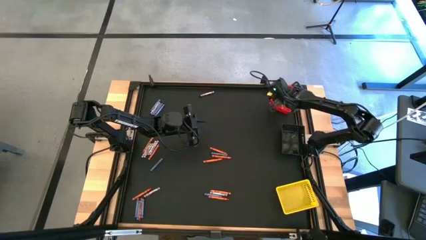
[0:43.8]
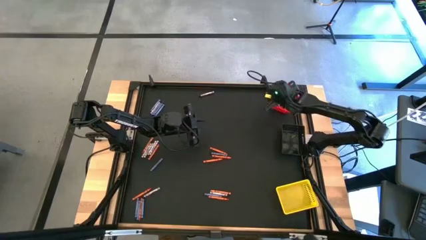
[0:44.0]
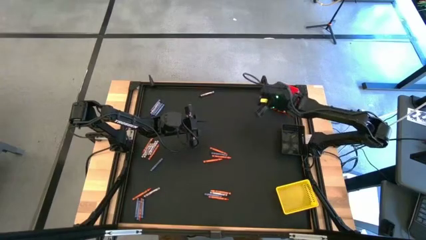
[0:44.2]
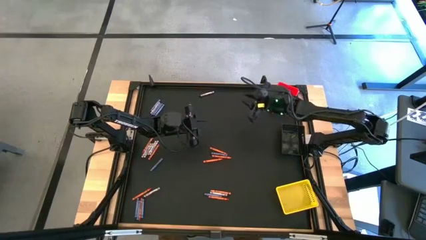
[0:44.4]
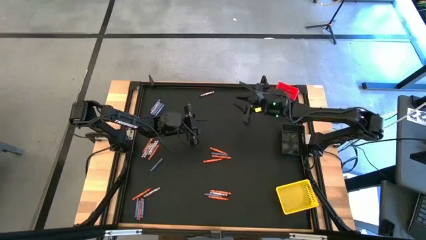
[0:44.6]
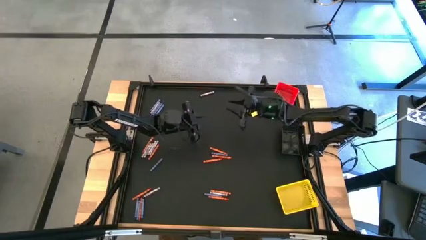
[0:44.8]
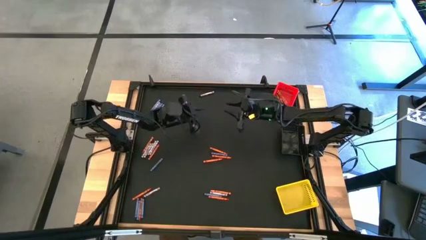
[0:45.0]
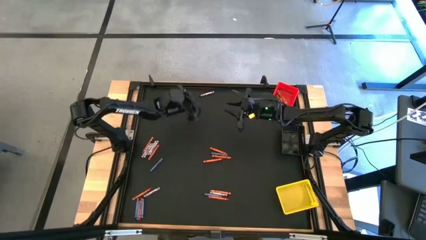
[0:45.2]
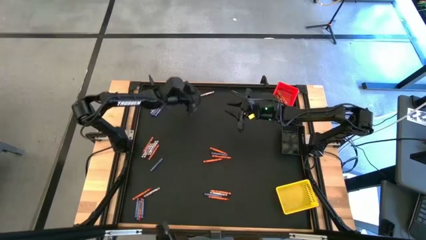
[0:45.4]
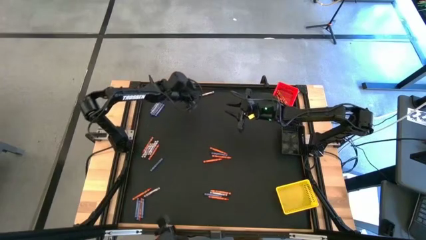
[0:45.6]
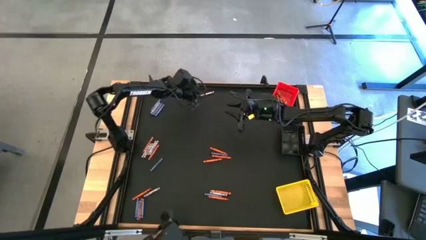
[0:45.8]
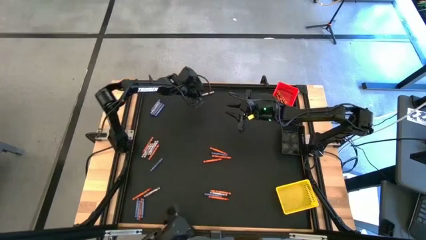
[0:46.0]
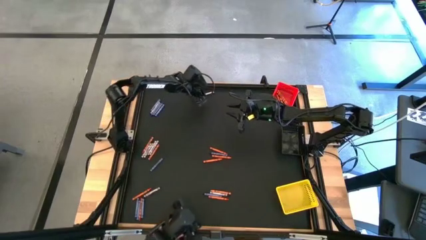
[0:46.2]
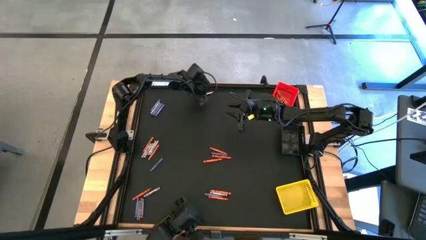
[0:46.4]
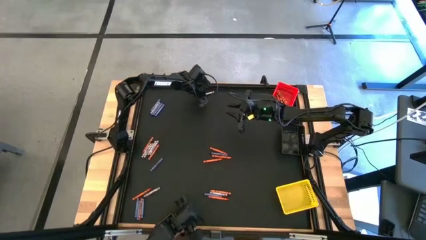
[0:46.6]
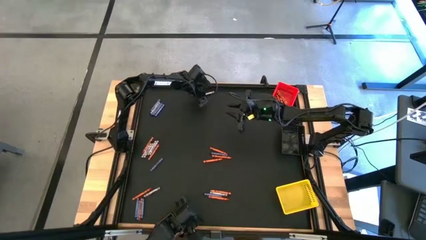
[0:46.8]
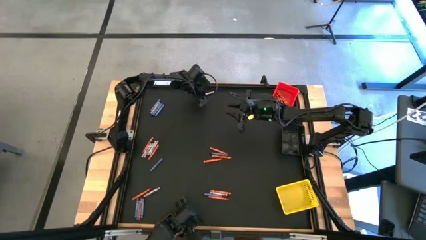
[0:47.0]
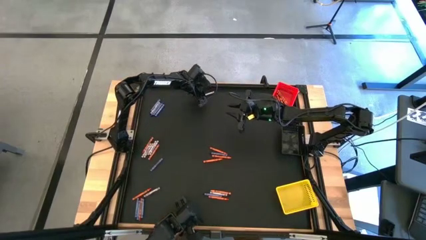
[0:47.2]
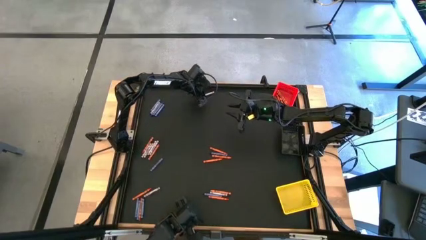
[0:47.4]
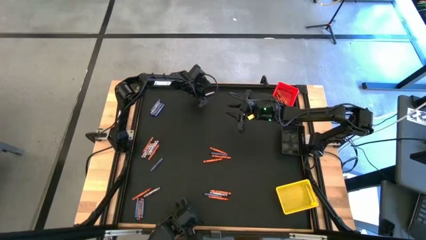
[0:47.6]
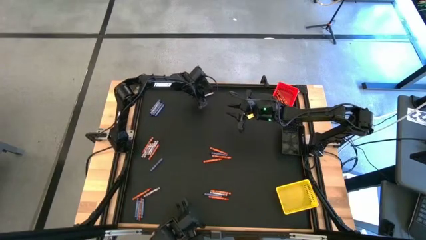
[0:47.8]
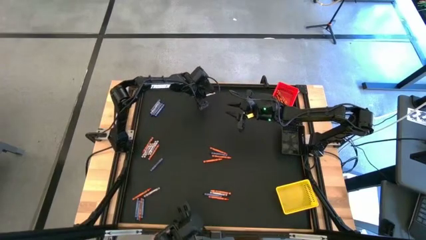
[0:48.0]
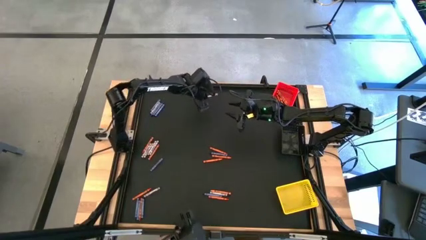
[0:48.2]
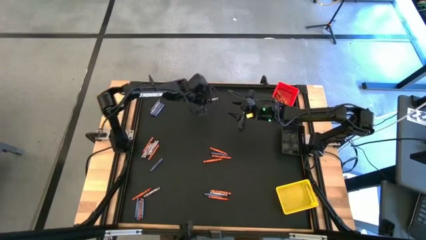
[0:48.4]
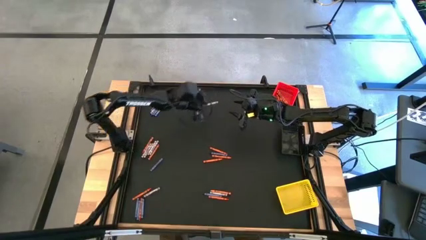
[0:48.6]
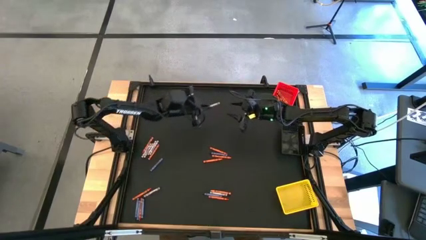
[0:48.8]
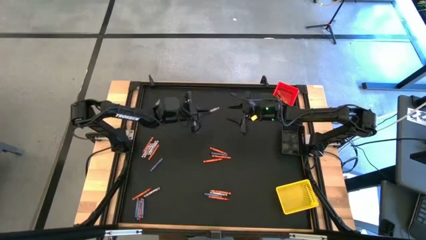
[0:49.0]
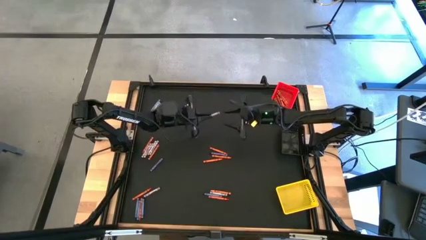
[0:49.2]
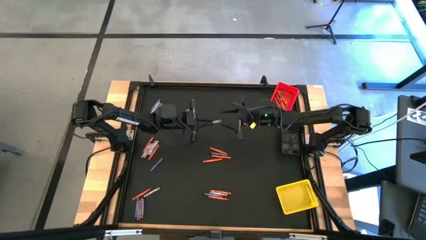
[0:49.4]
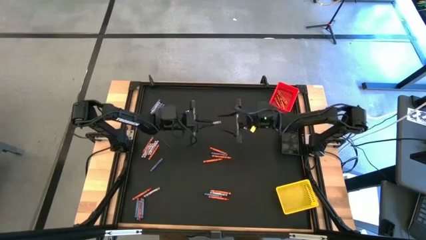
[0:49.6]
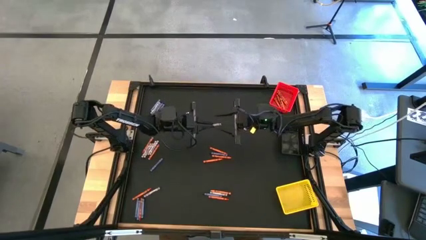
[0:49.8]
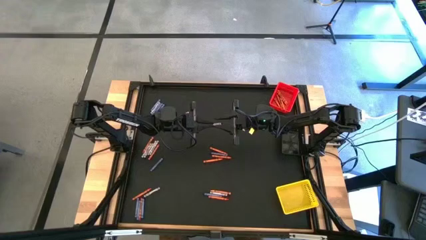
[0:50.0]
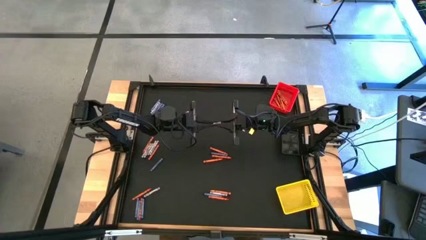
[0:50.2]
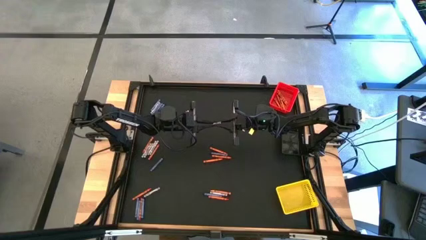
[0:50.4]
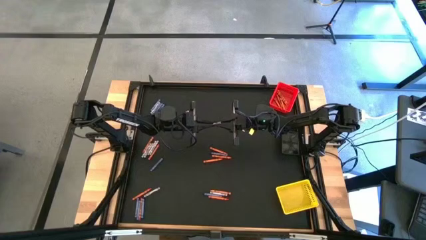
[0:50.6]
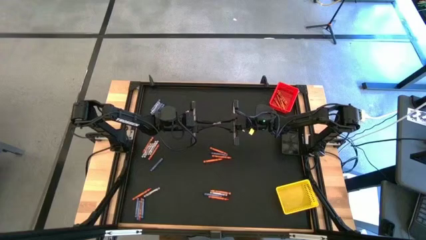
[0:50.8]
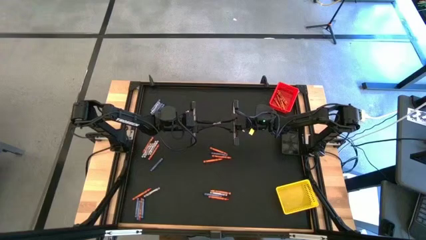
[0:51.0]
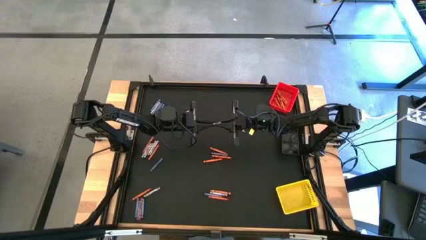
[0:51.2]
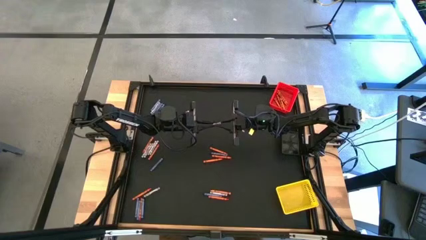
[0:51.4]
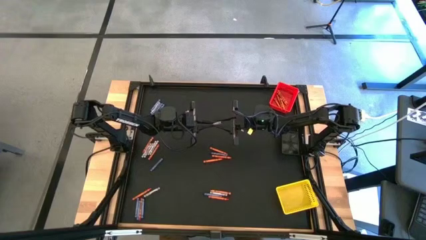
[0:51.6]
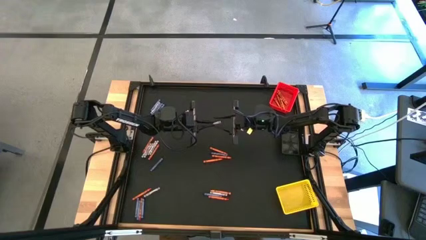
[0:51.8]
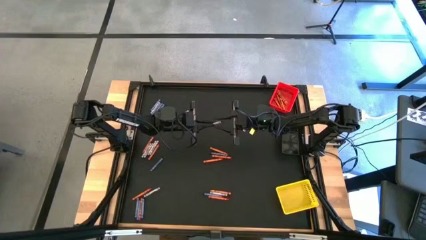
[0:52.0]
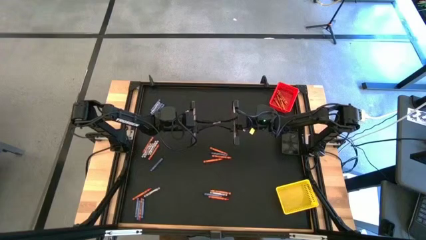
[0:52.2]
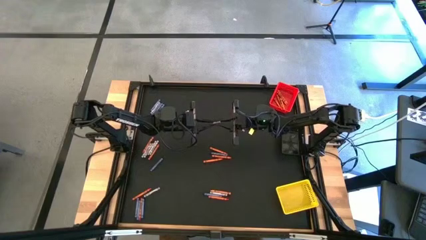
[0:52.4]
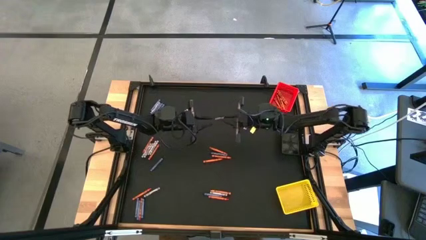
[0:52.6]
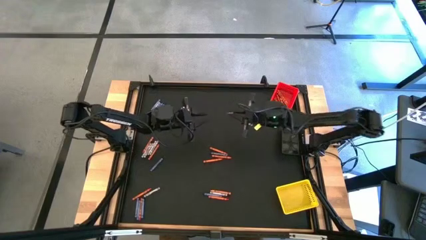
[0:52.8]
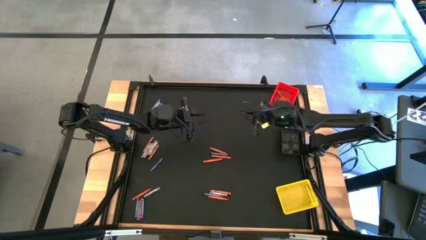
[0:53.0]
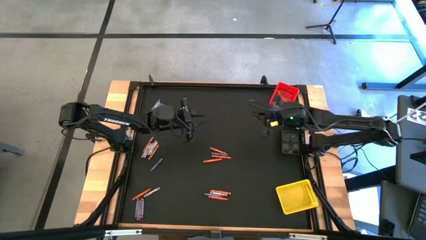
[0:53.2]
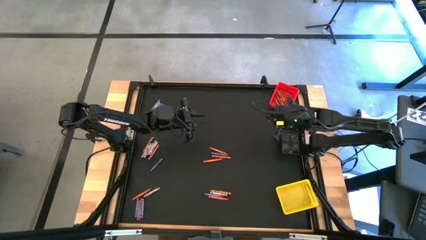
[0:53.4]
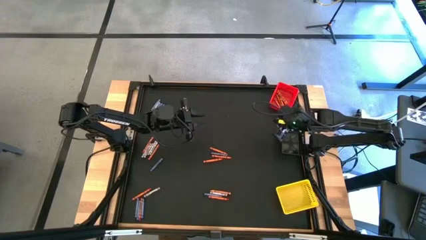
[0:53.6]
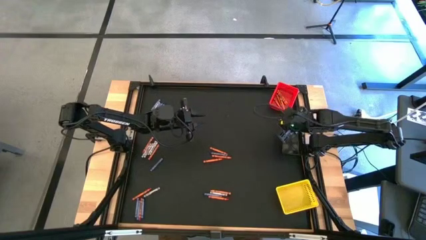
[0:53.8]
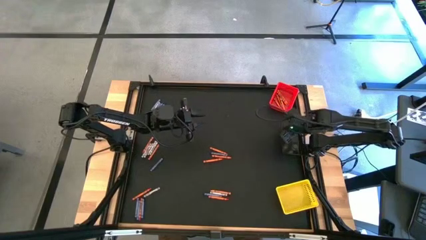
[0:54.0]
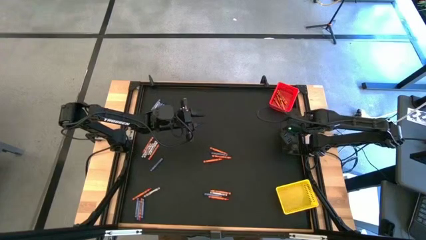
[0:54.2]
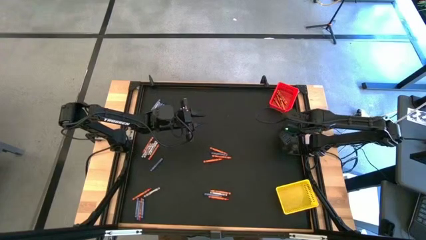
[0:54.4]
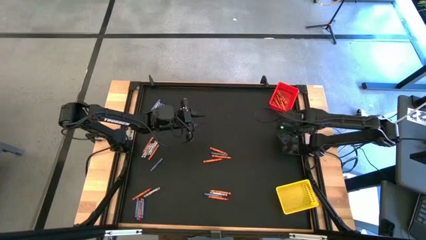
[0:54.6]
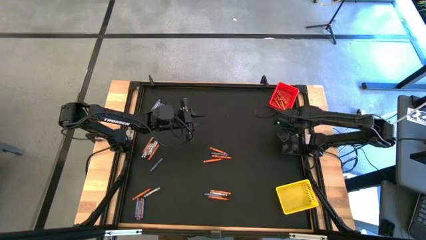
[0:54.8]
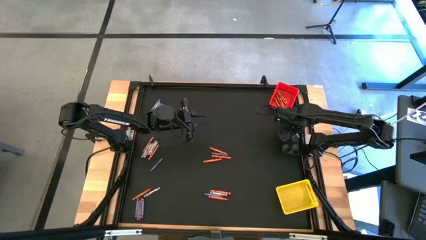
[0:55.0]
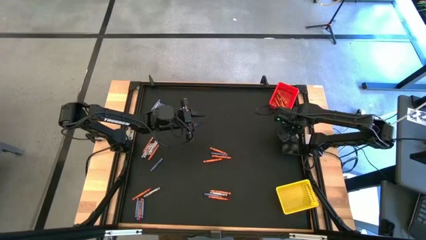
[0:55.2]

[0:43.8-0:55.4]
Task: Sort crayons
Put the black crayon into the black bin

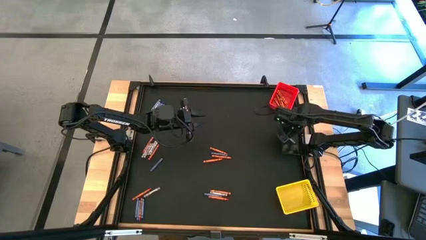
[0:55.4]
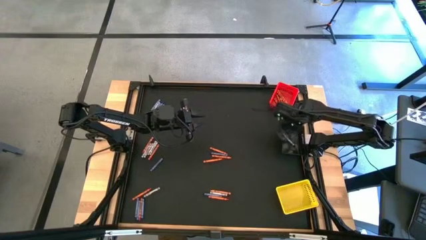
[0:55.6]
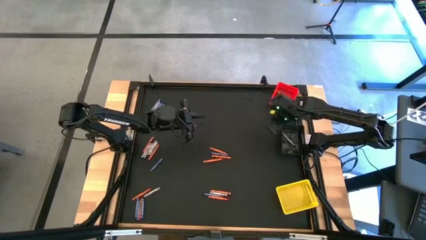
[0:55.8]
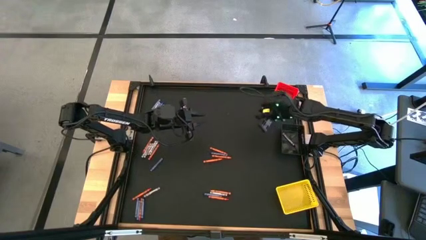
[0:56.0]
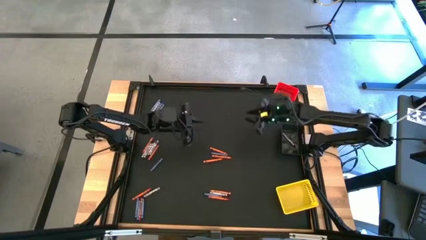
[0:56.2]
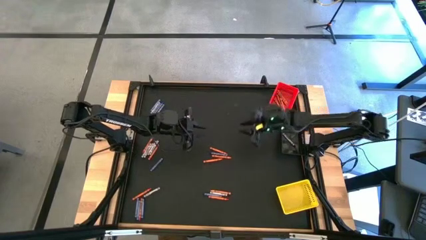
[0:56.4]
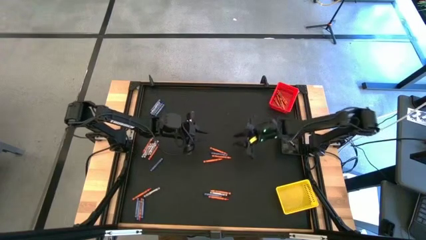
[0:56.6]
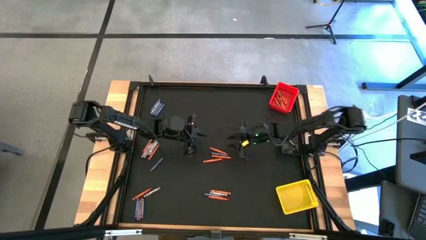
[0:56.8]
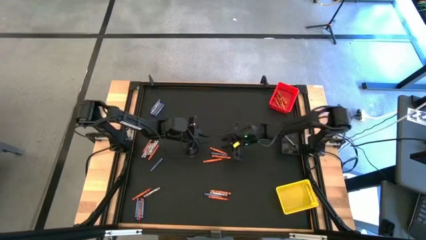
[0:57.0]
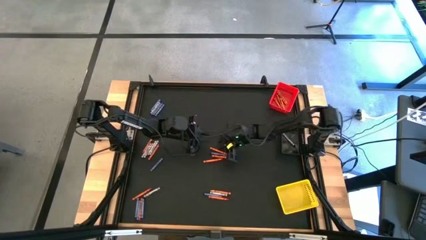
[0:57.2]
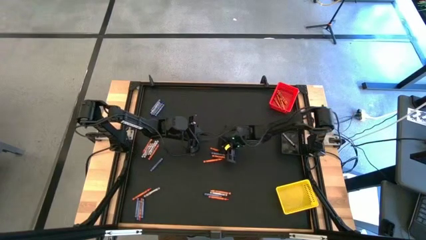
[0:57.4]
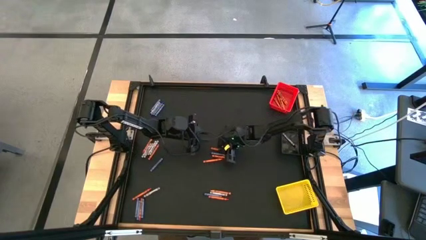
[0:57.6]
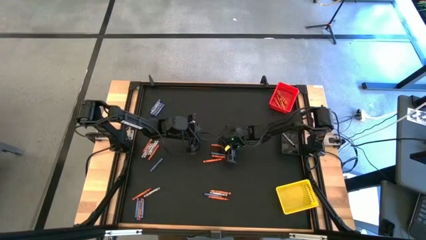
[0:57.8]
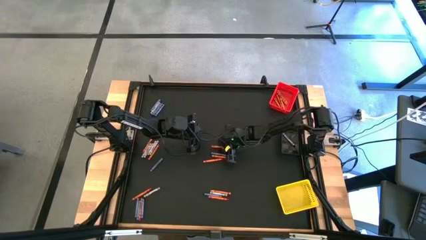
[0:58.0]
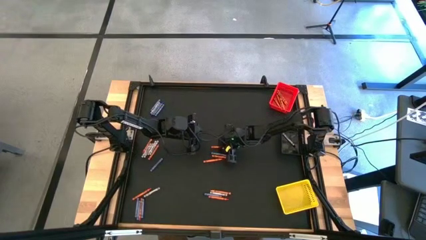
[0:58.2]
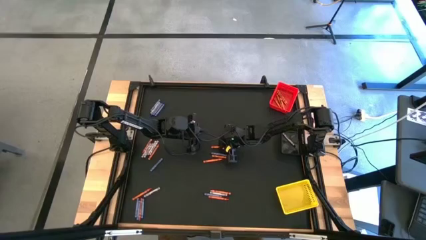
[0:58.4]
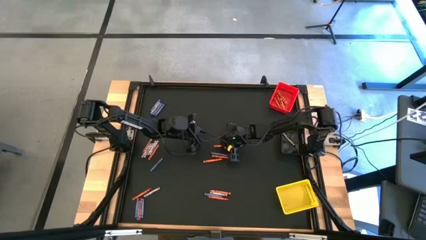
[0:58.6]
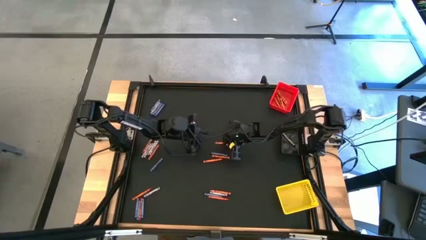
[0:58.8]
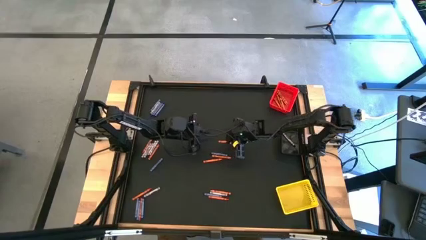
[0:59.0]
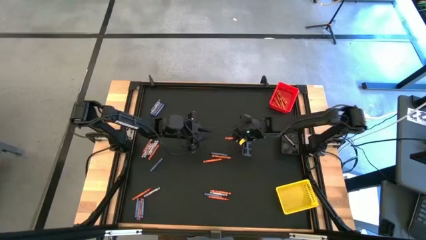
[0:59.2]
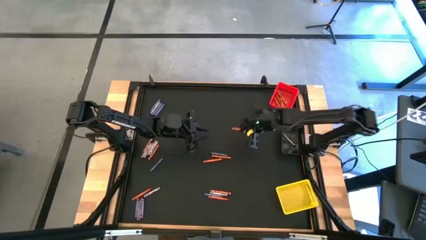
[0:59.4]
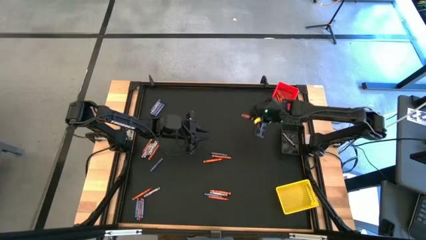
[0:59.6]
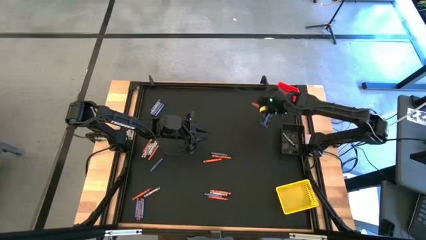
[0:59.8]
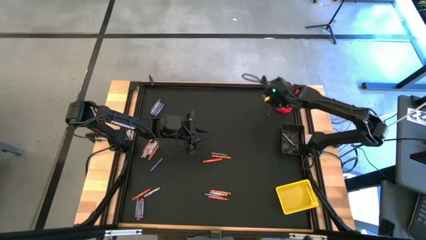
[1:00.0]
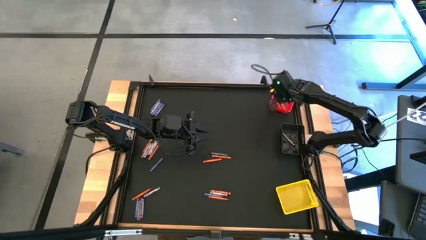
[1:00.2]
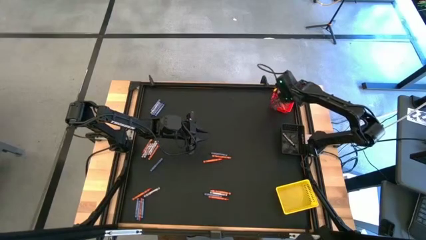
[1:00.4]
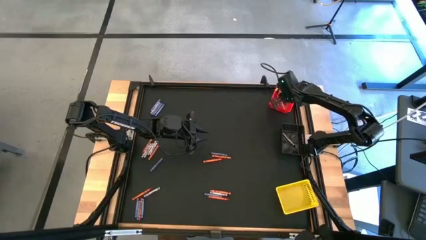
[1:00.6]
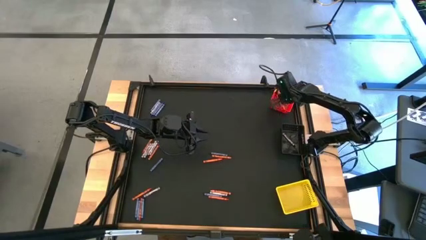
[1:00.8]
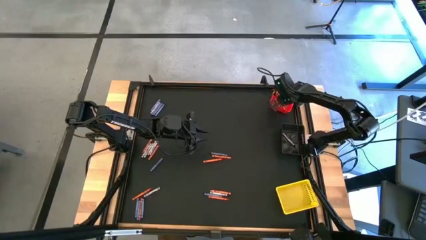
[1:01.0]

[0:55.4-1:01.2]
Put the orange crayon into the red bin
